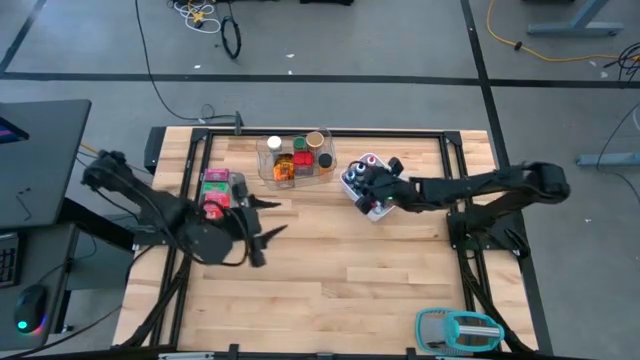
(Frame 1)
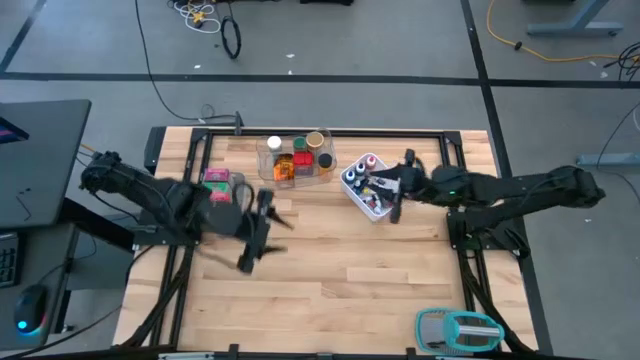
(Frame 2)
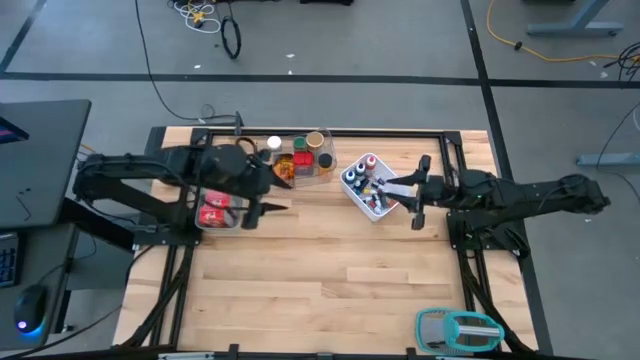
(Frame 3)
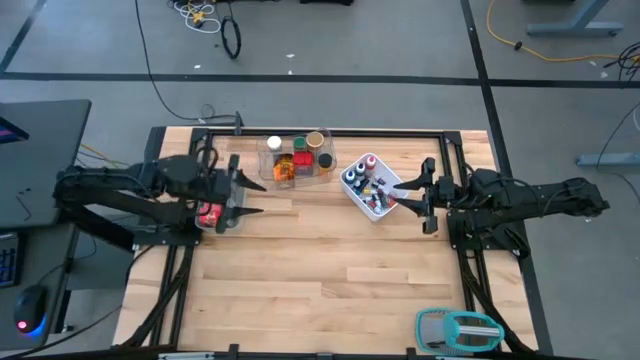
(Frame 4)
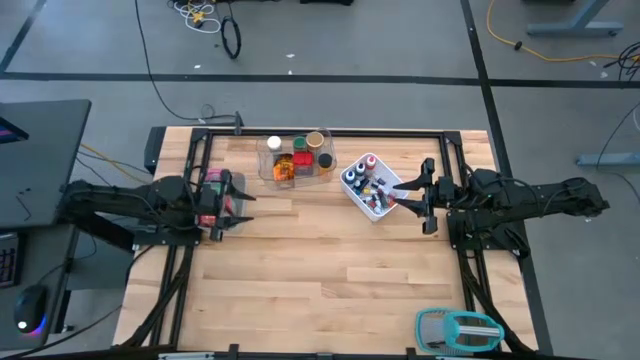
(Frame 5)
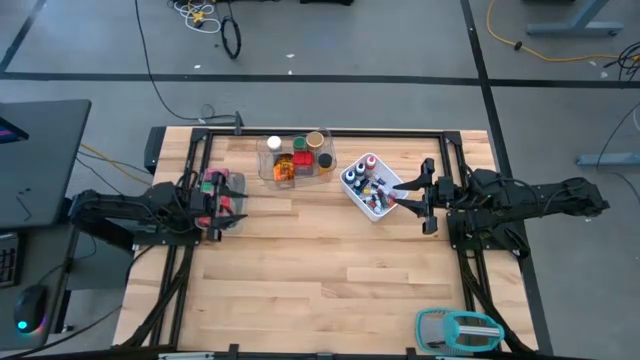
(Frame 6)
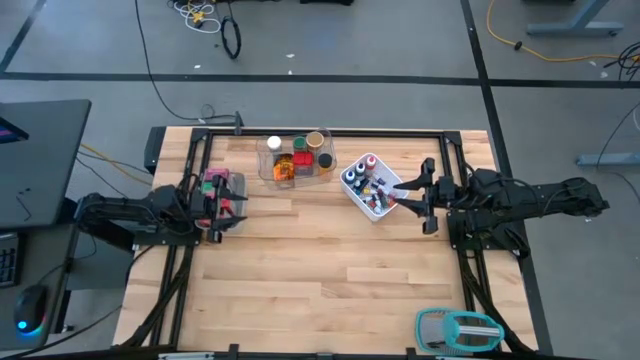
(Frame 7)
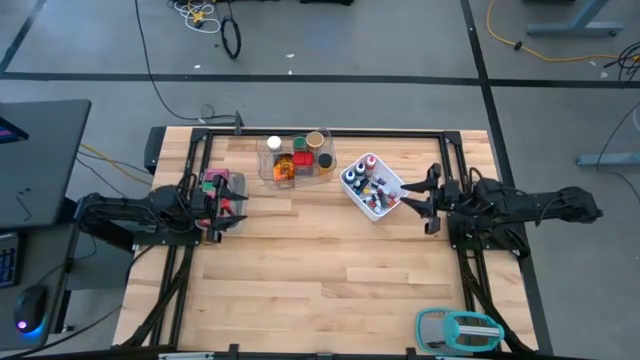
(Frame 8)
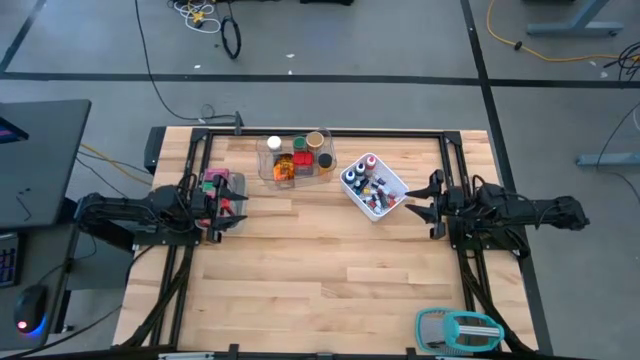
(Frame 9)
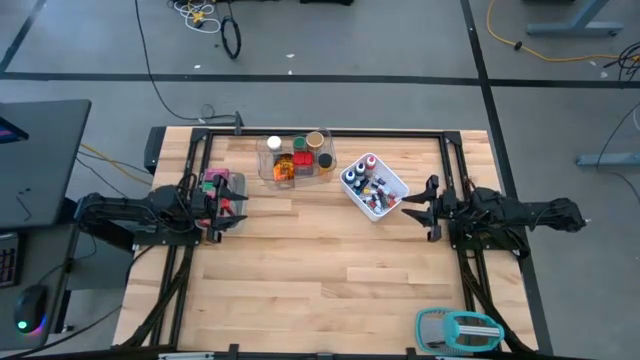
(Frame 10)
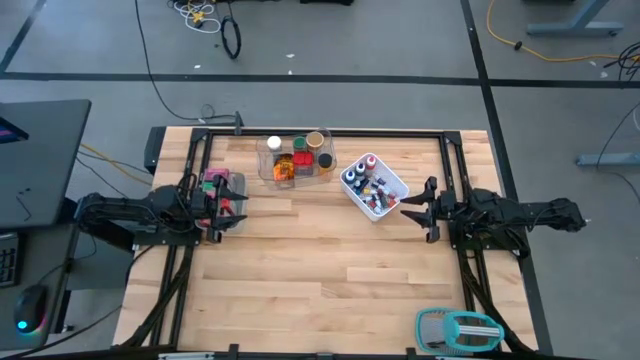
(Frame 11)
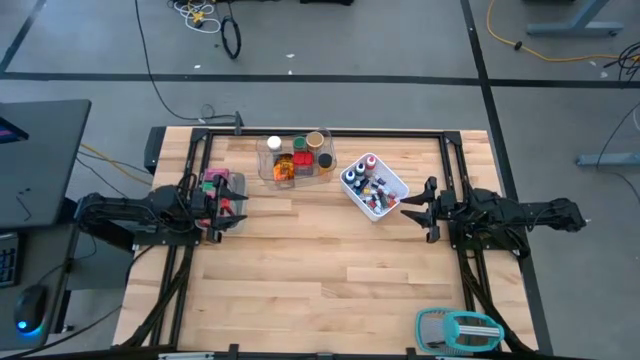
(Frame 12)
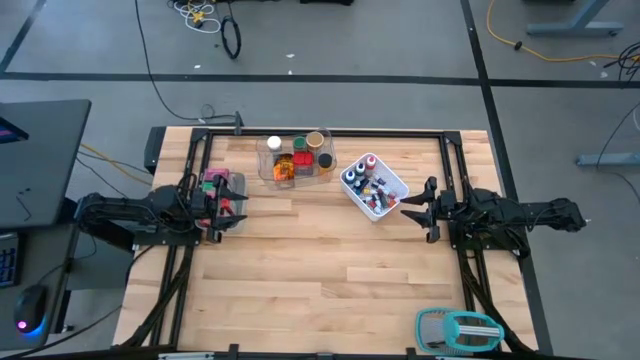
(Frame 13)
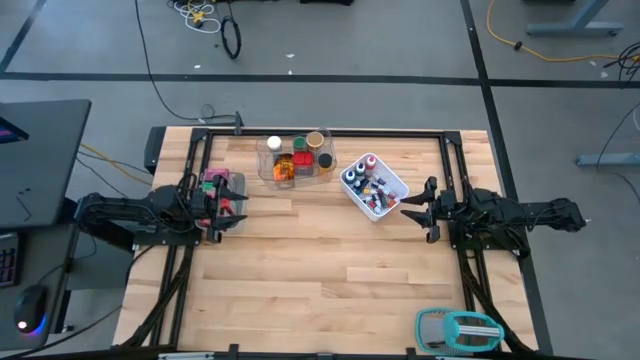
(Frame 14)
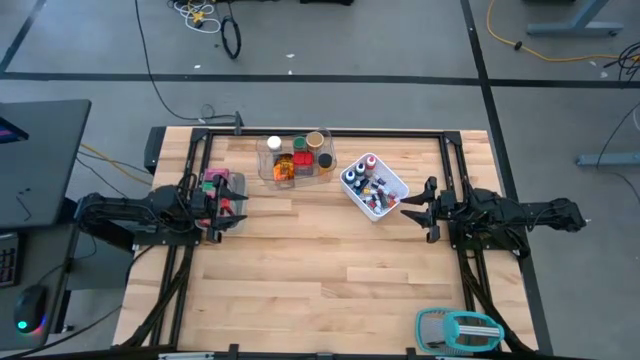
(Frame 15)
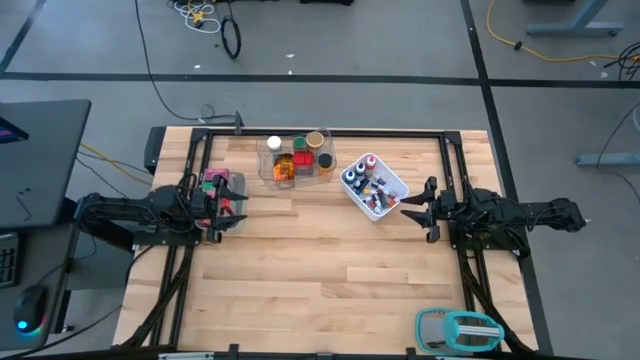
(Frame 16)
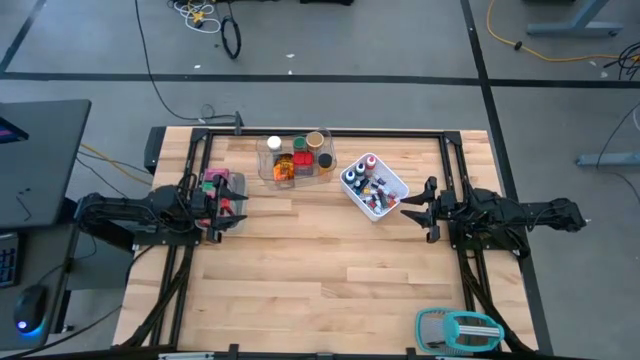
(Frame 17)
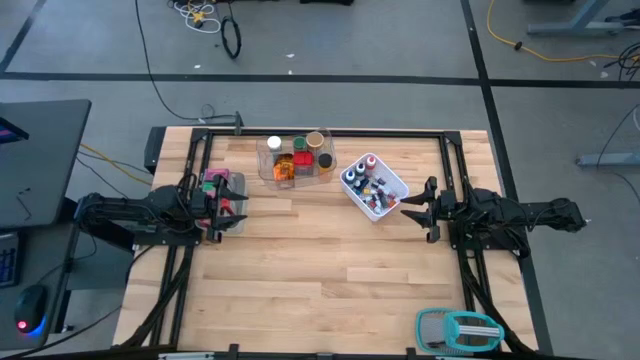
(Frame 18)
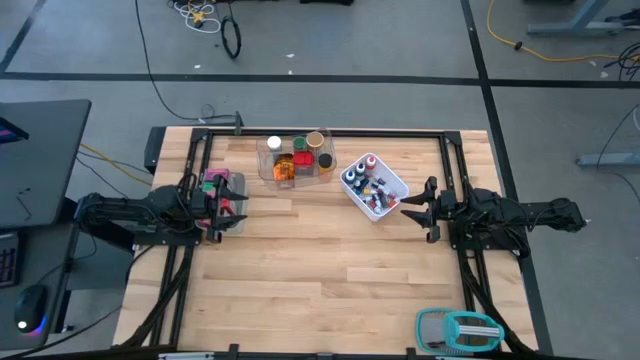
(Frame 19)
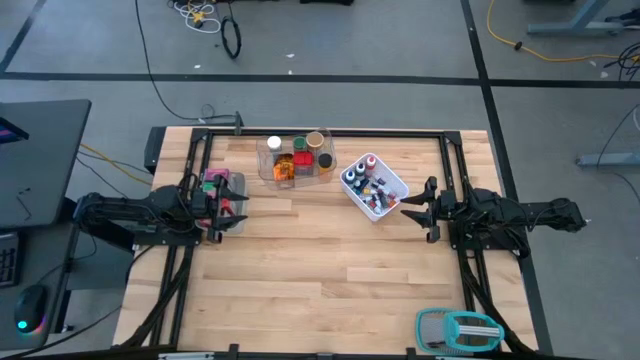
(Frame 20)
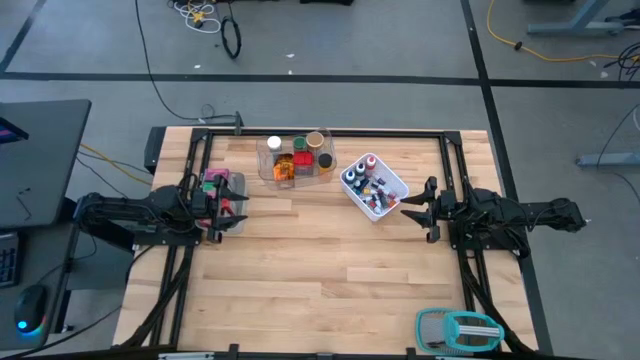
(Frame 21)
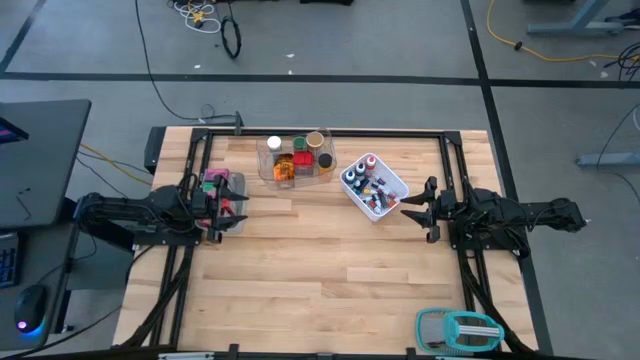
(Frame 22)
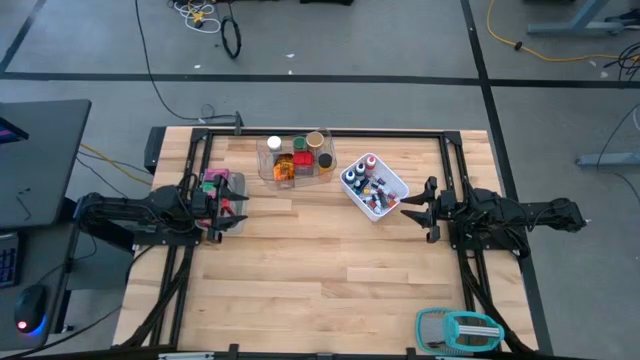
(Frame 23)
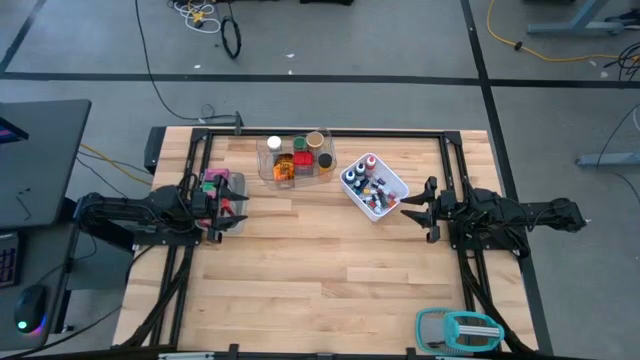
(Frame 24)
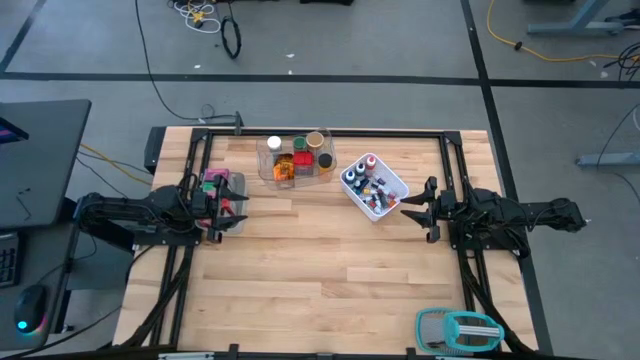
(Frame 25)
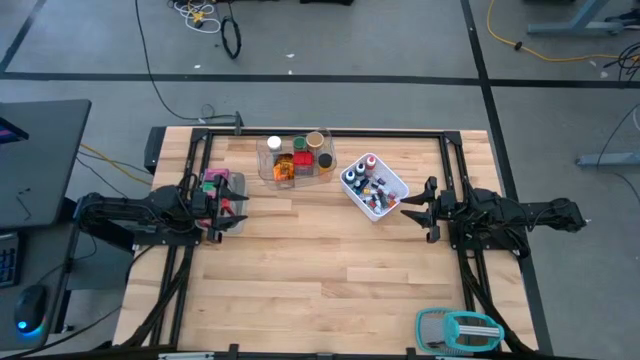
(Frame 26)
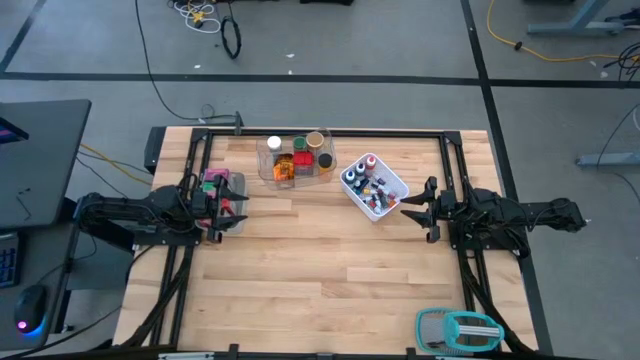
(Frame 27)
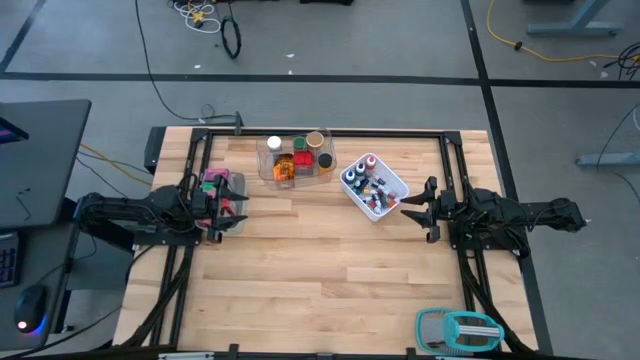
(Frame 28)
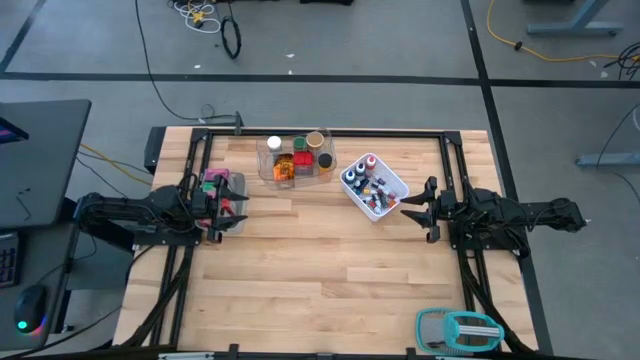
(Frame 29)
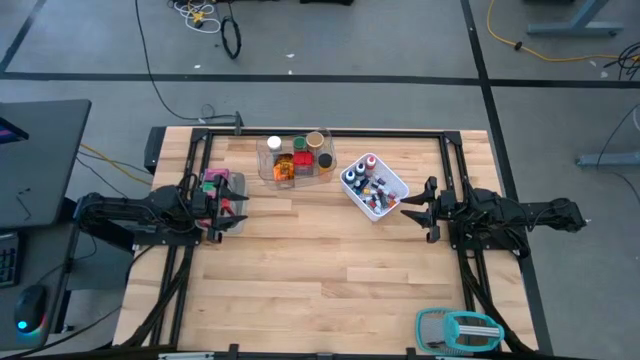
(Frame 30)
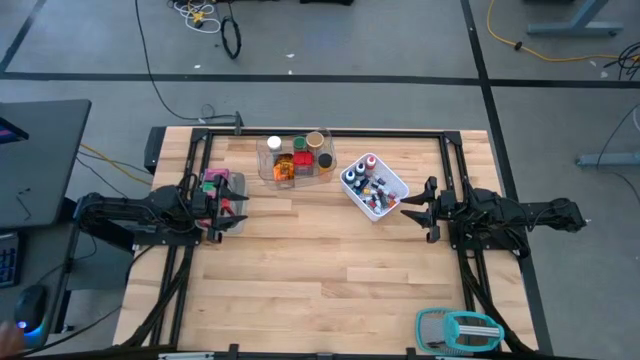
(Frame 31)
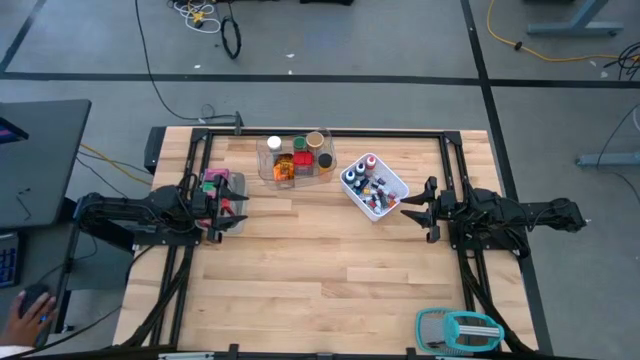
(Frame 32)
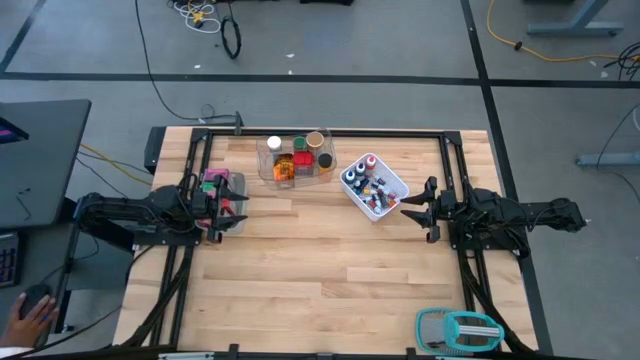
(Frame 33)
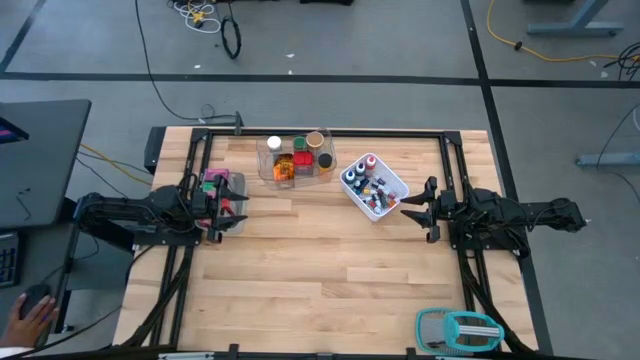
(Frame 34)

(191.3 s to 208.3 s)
Task: Pick & Place Kitchen Items
Return to Home Position

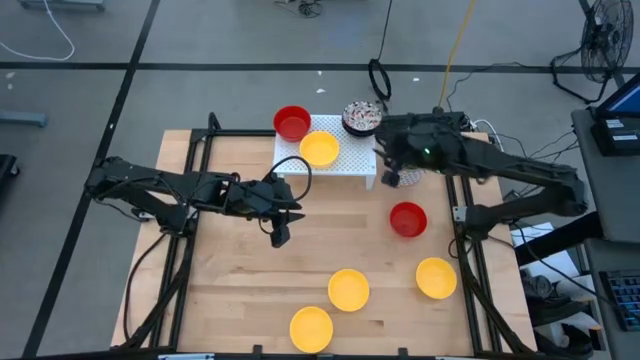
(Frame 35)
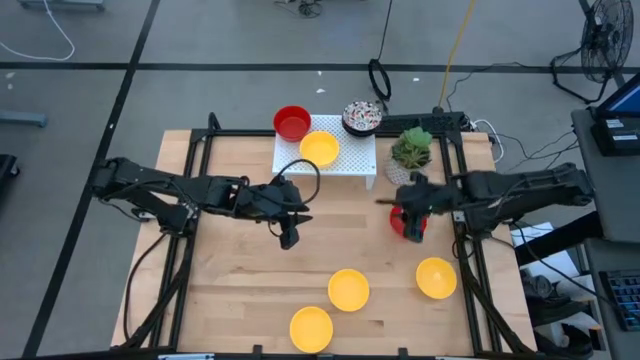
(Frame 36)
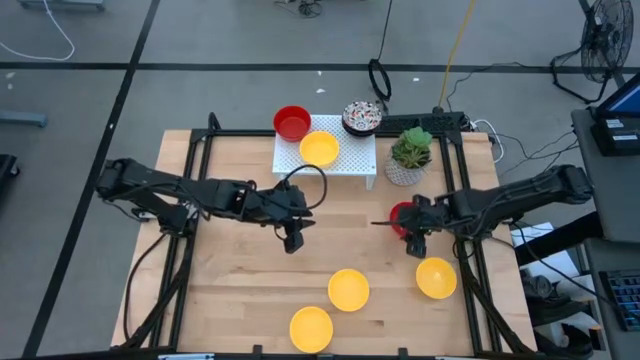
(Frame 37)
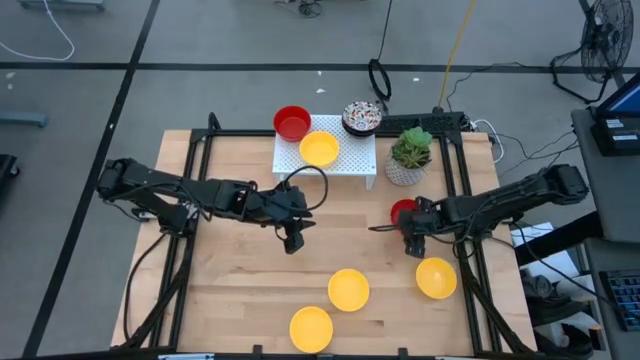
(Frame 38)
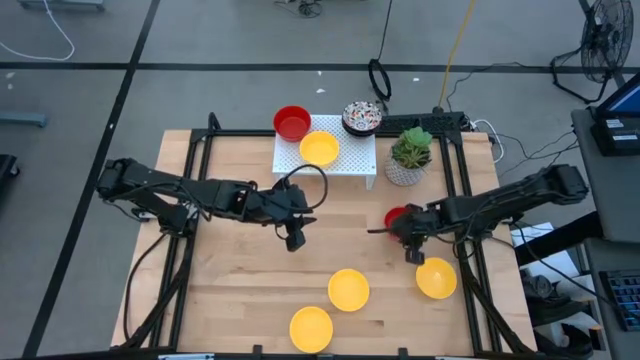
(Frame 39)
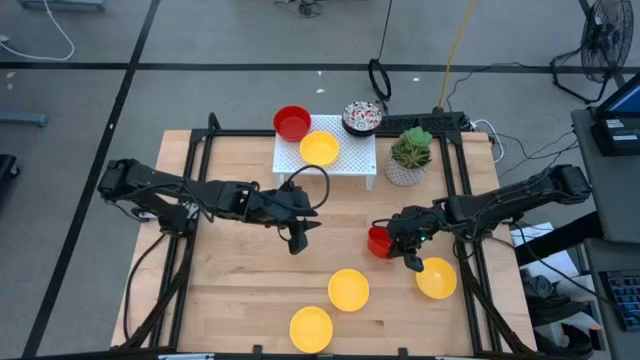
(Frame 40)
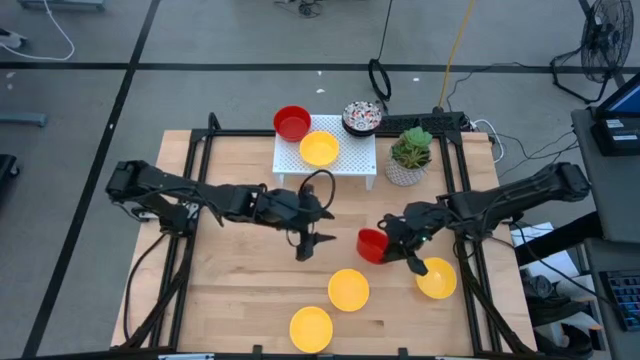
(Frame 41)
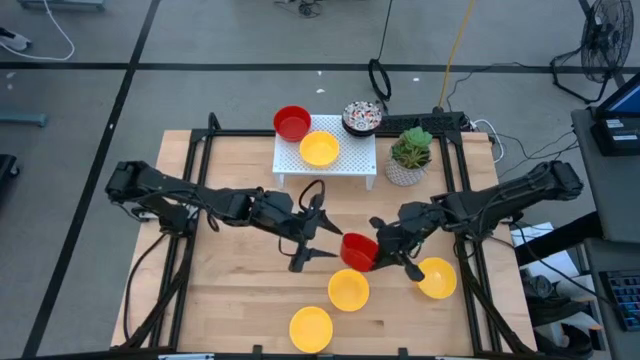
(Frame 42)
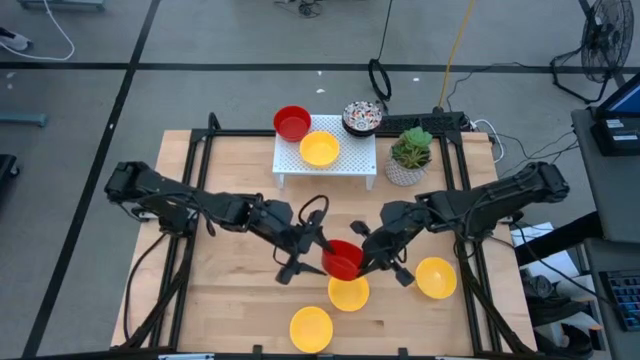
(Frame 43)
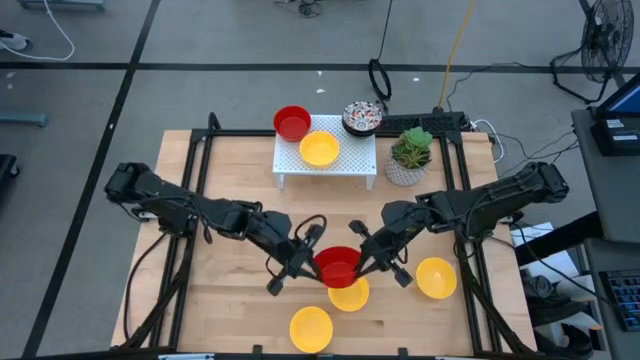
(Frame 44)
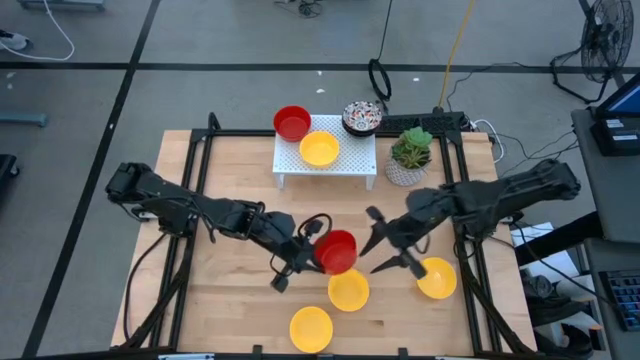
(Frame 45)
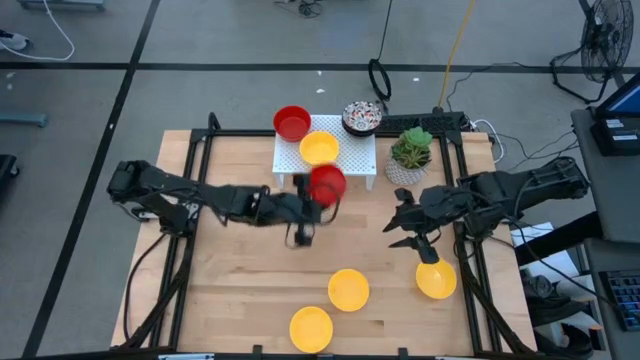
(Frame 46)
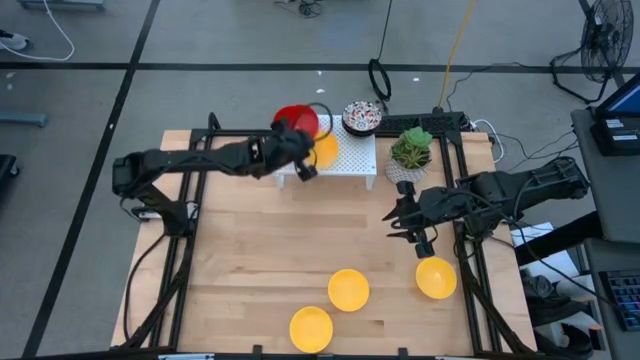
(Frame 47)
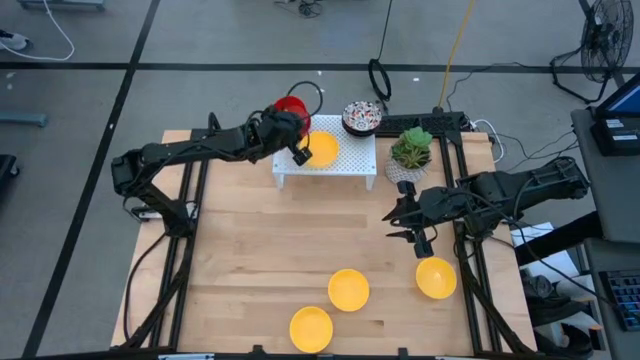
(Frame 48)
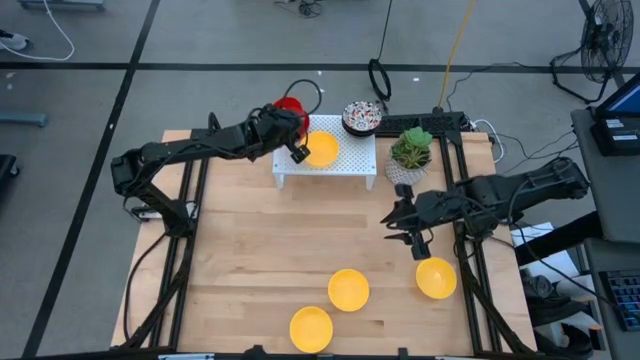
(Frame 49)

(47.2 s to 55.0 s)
Task: Pick & Place Mini bowls
Stack the red bowl on the other red bowls on the shelf
